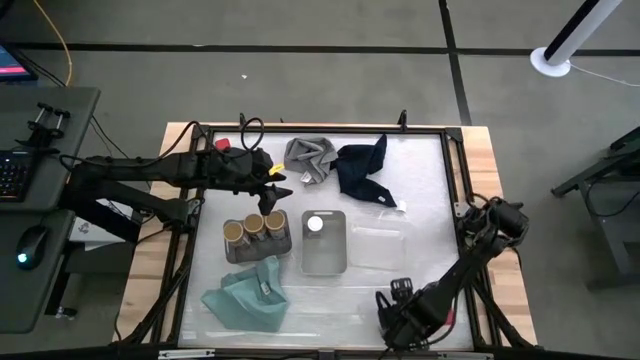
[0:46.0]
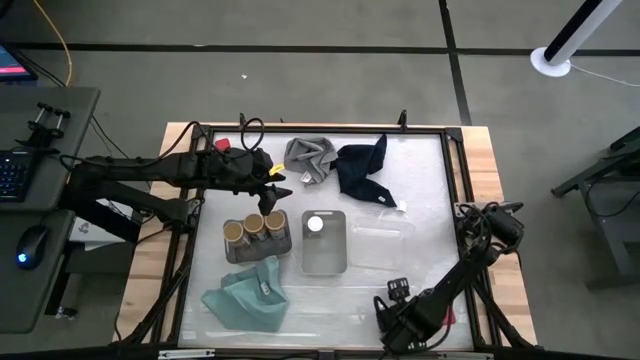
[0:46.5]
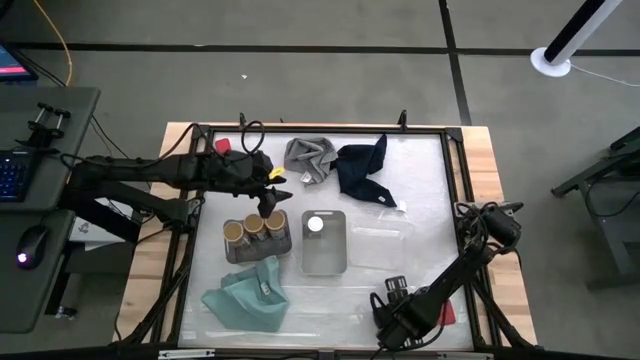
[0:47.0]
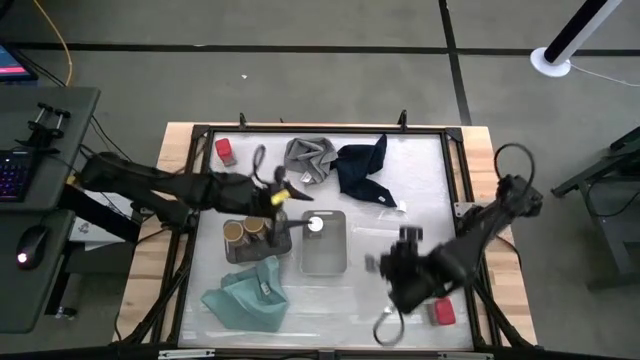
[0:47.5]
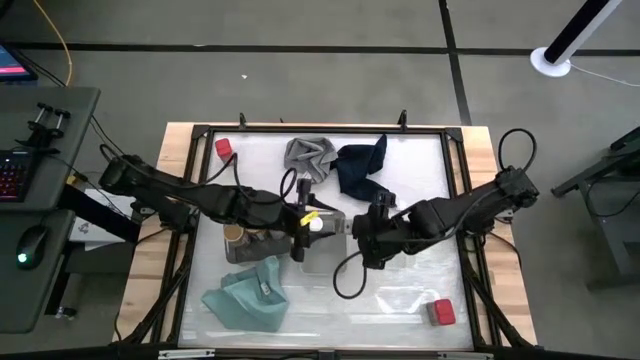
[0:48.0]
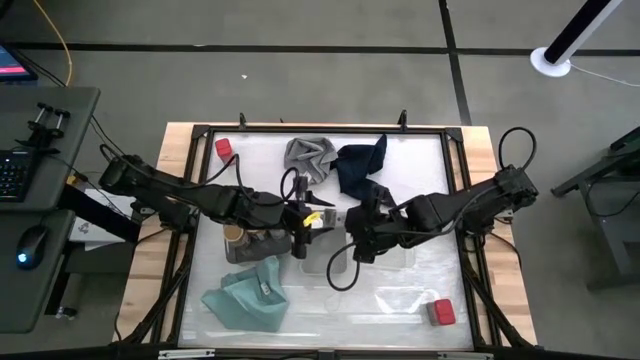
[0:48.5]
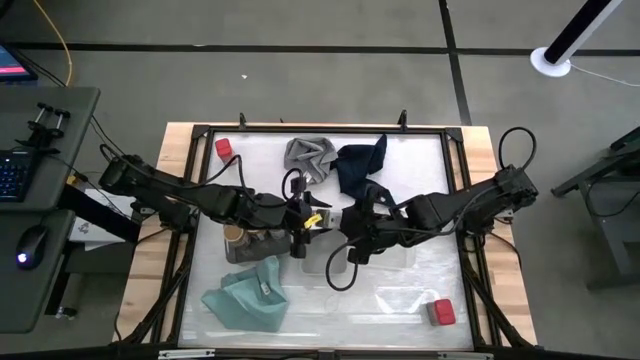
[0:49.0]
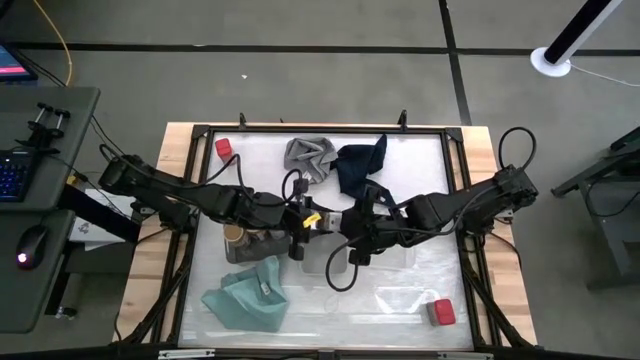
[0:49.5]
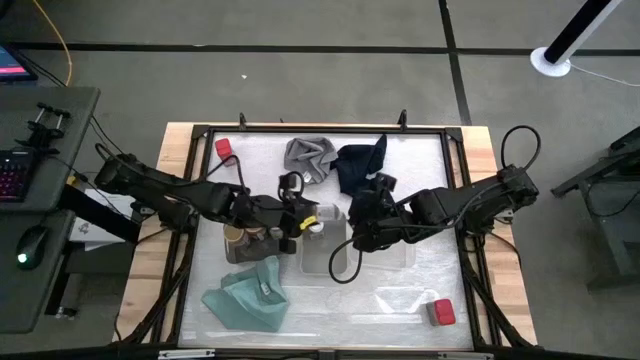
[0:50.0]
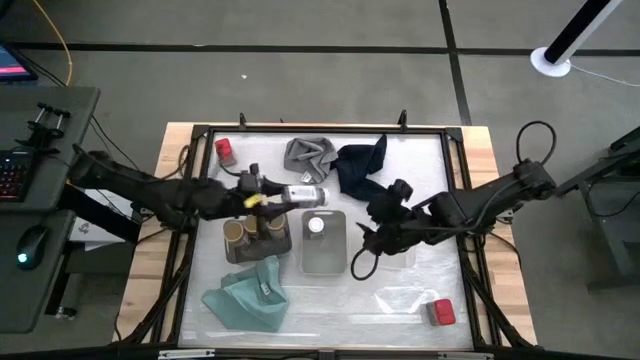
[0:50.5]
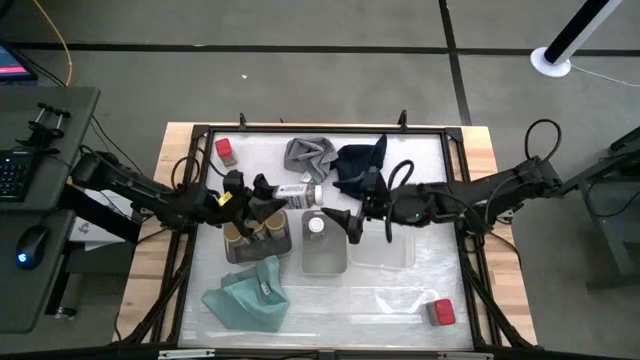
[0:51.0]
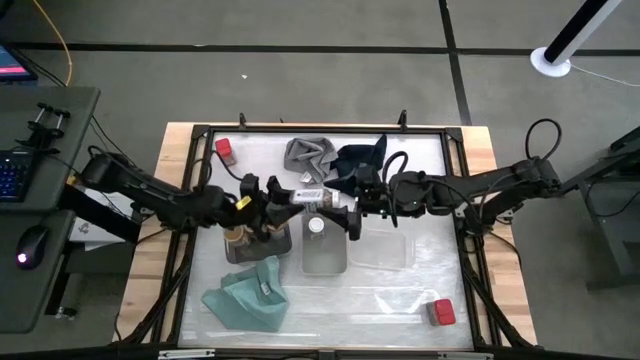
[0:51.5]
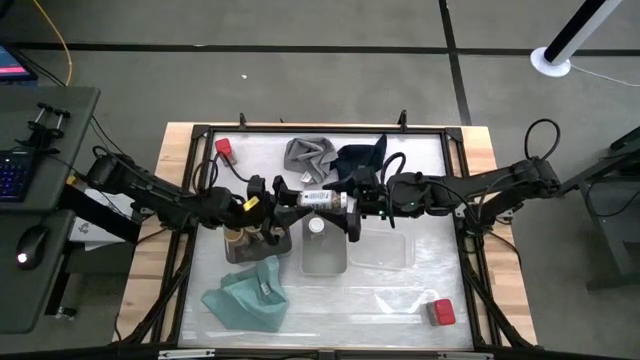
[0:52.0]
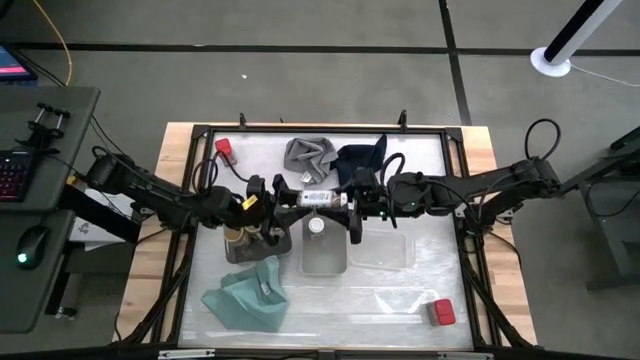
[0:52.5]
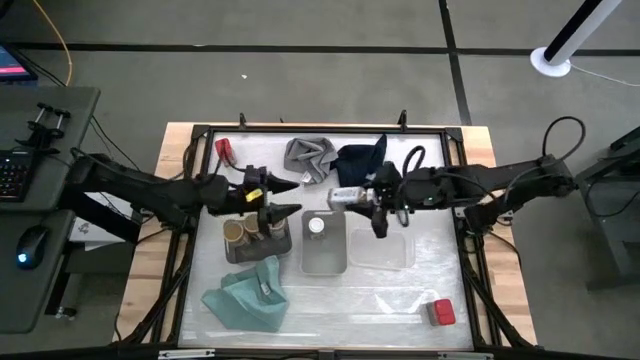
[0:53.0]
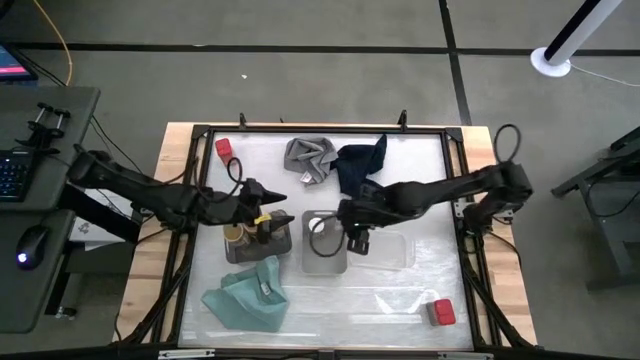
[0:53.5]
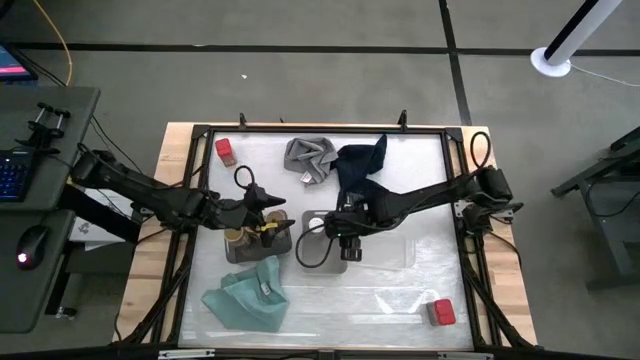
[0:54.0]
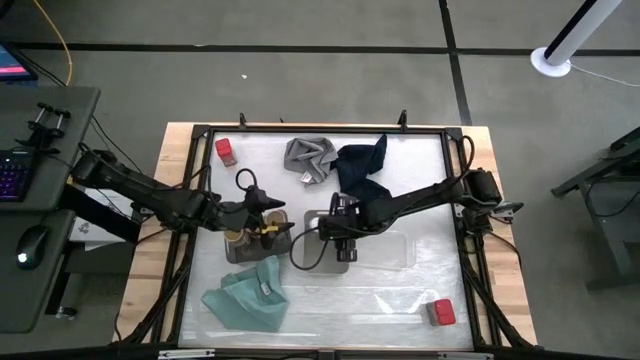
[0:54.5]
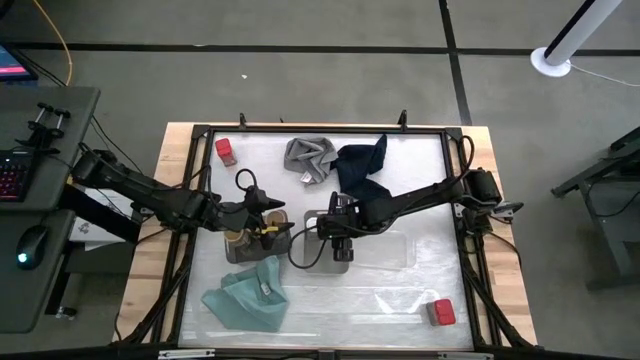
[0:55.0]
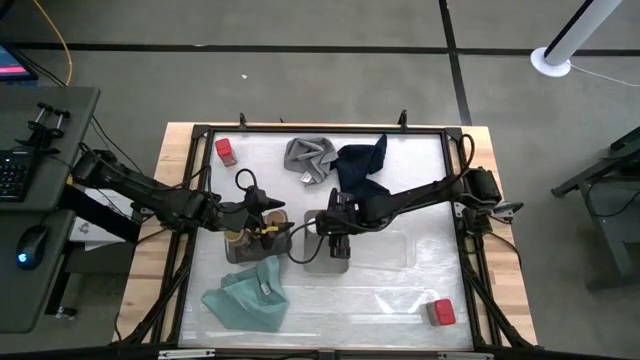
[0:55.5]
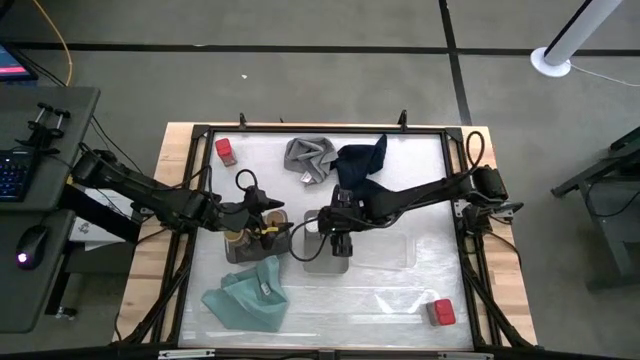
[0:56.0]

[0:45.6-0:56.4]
Task: Sort spices by type
Put the white seasoning bottle into the gray bin

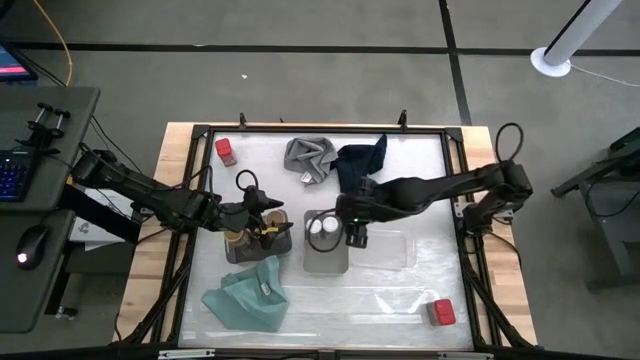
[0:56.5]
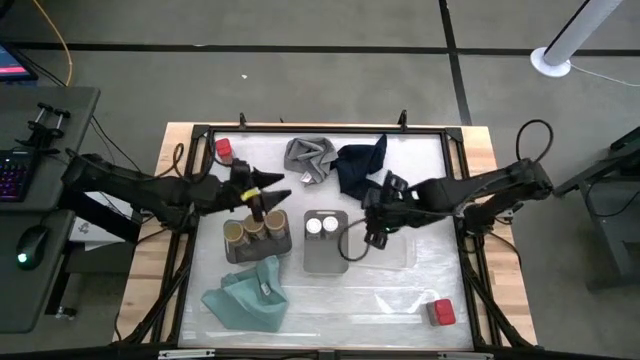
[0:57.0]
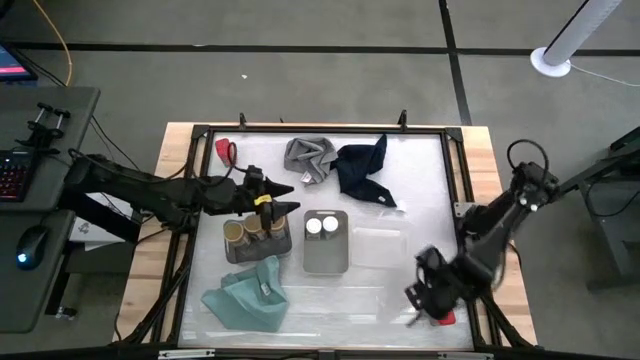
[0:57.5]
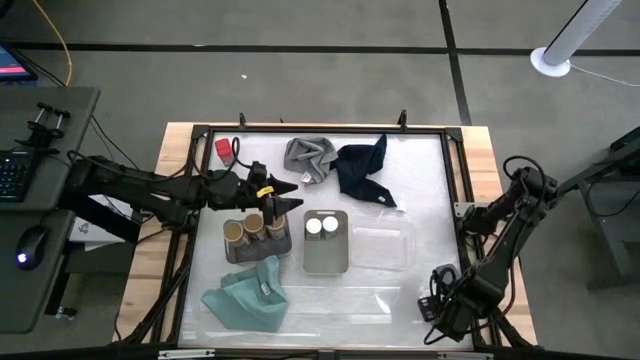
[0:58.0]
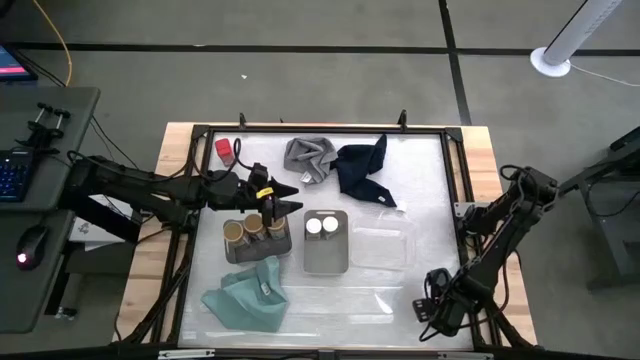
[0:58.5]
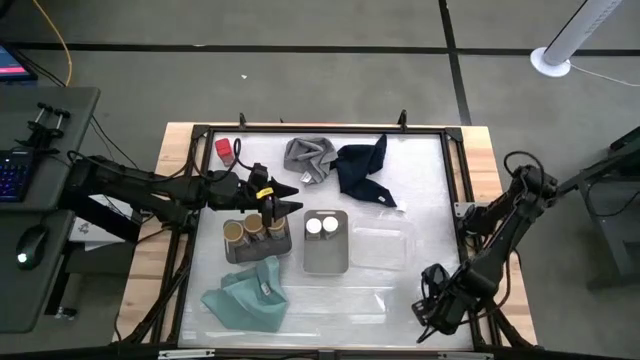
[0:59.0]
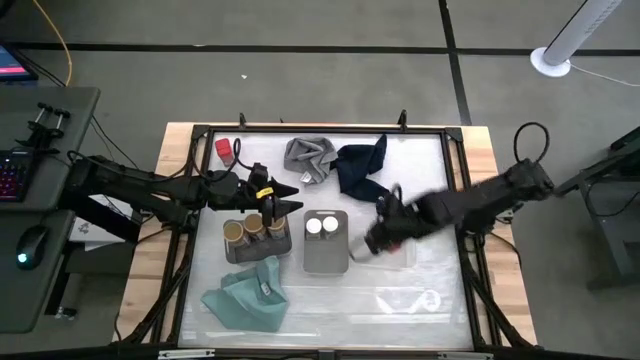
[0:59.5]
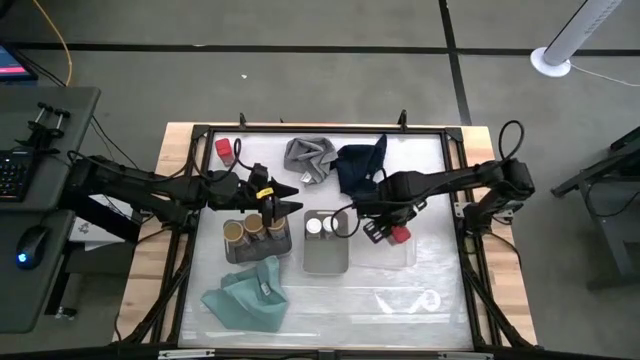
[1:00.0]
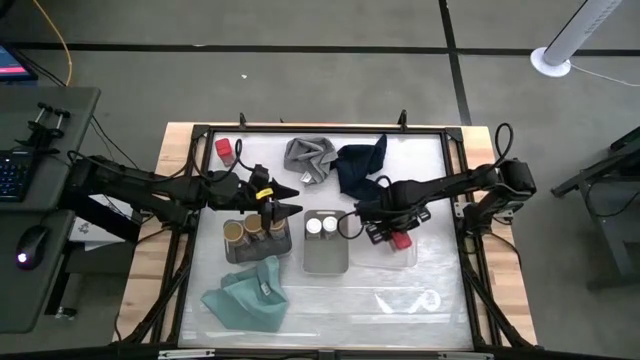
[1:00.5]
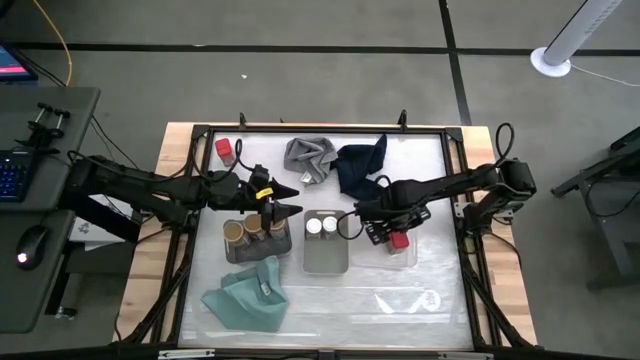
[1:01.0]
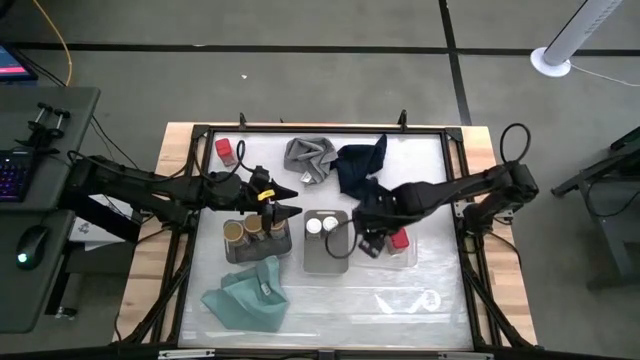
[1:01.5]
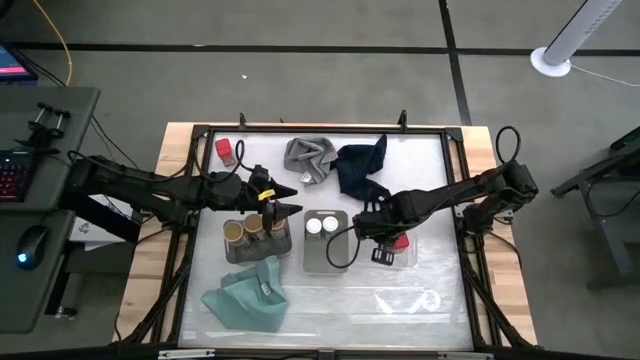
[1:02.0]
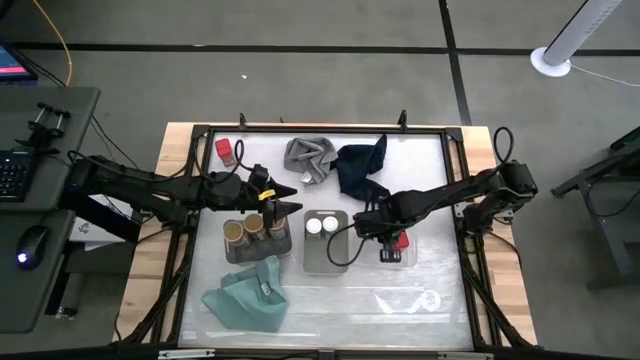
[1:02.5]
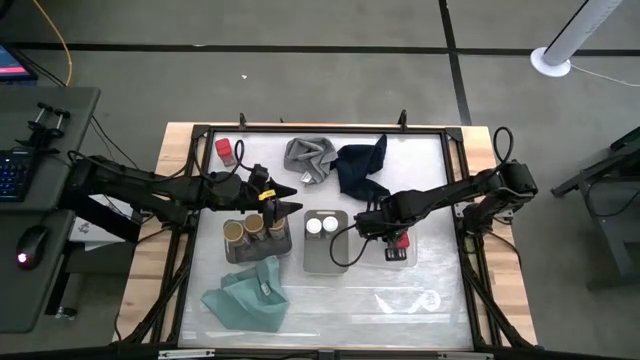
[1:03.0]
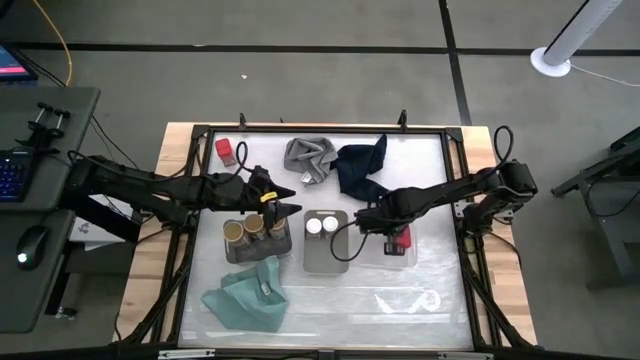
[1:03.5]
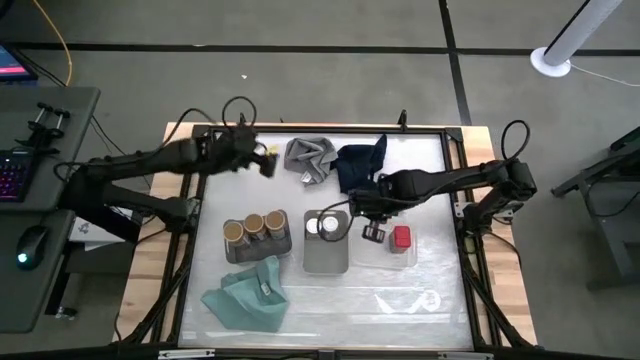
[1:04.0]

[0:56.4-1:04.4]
Put the bottom red seasoning can into the transparent bin

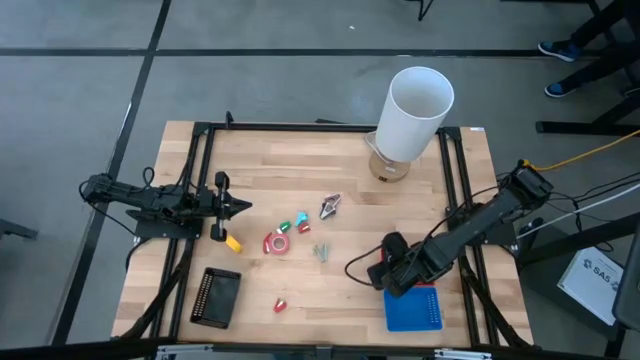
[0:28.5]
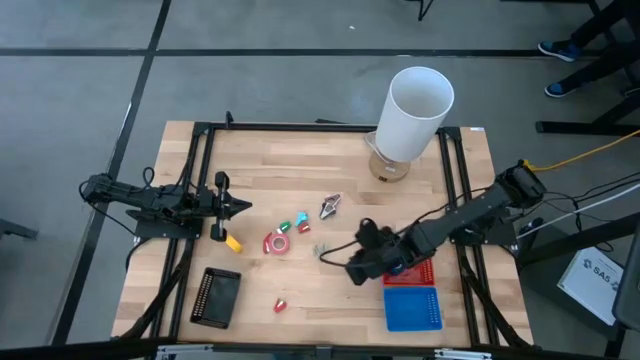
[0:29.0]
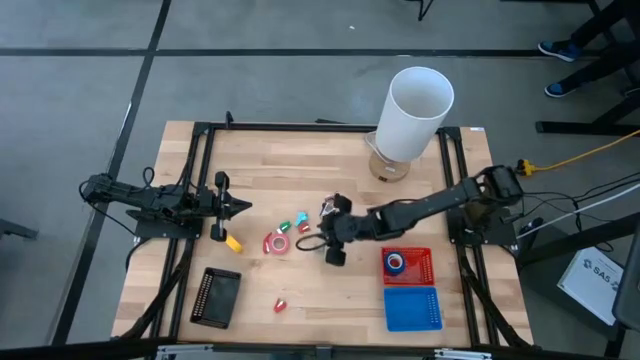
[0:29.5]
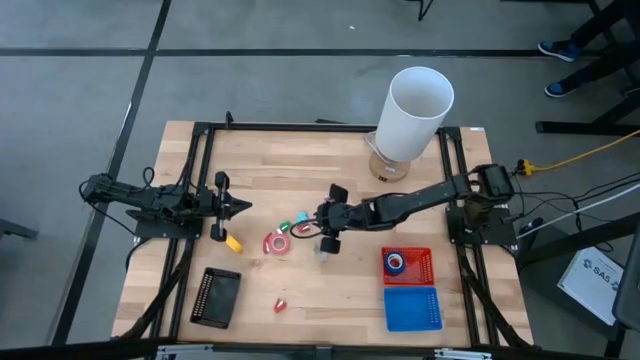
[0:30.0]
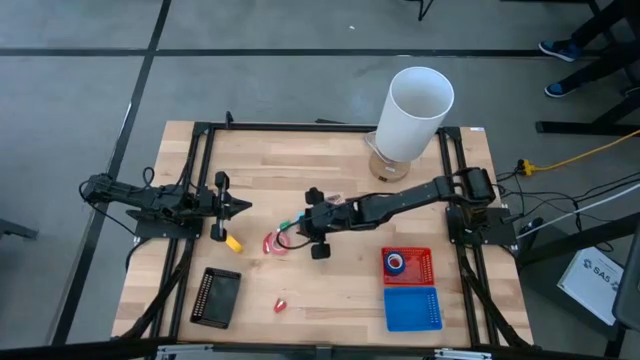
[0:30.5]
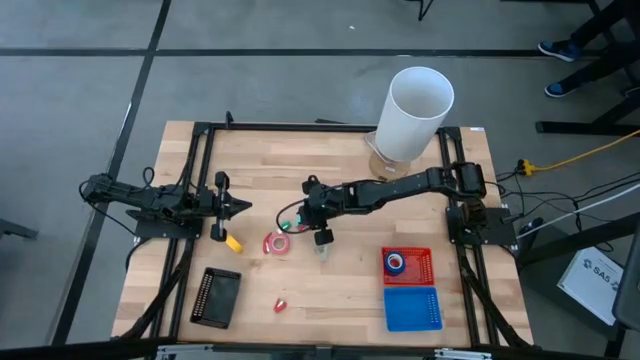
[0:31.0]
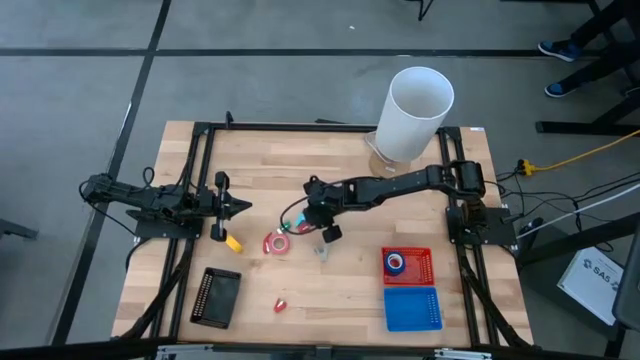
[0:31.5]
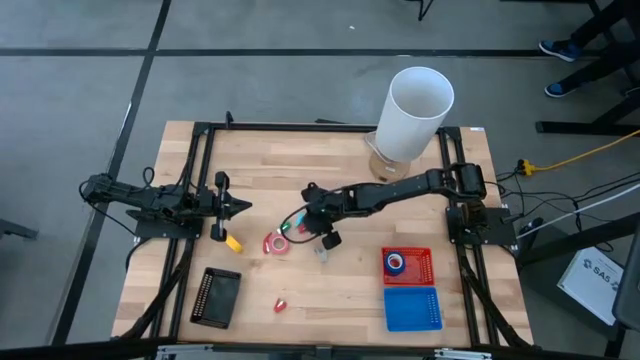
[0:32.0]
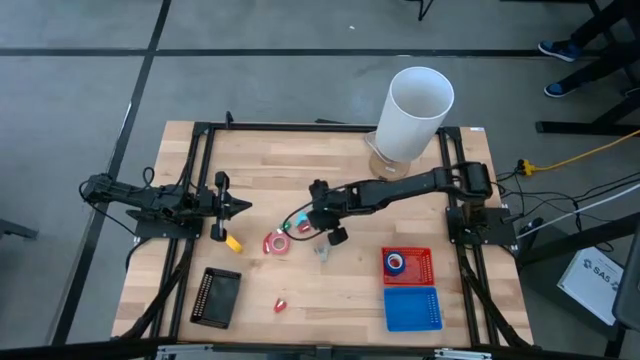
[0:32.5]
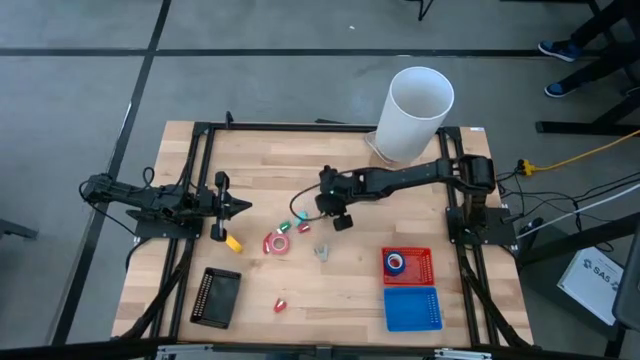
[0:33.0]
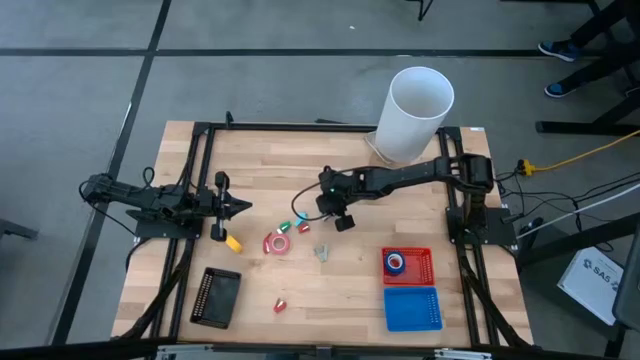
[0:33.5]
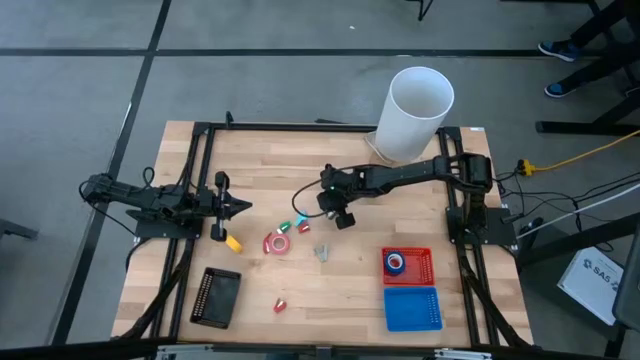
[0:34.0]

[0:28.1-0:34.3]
Task: Pick and place Stapler, Stapler remover, tape
Put the black staple remover into the blue basket
